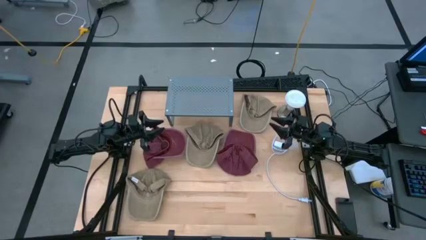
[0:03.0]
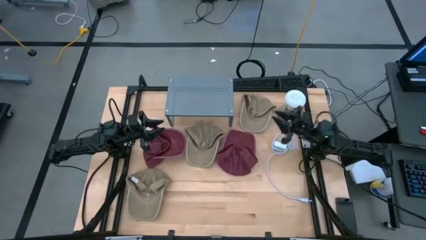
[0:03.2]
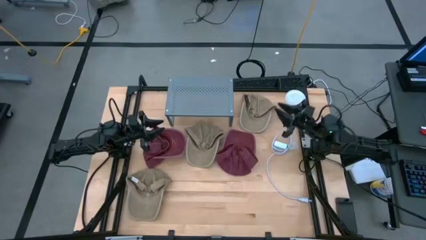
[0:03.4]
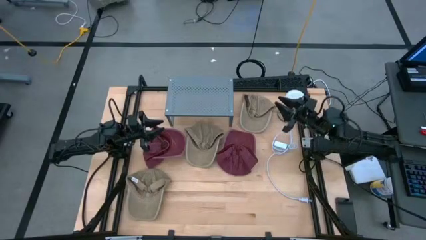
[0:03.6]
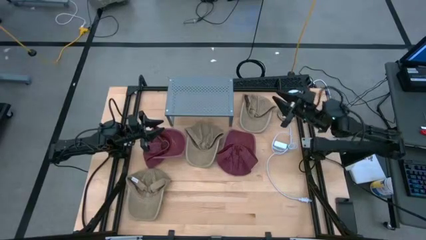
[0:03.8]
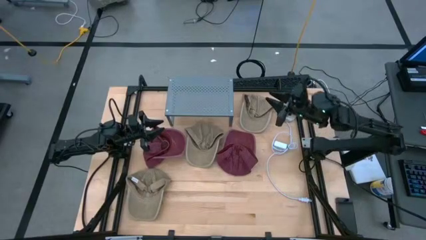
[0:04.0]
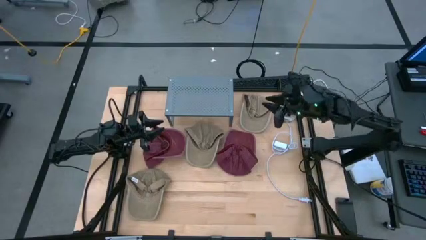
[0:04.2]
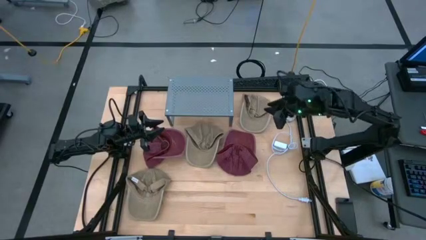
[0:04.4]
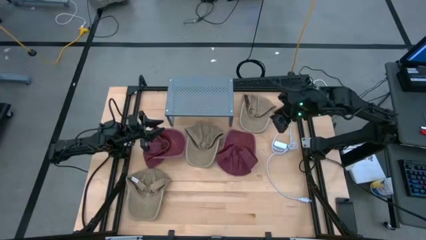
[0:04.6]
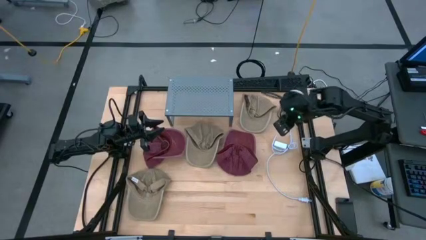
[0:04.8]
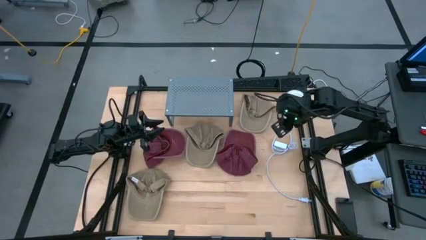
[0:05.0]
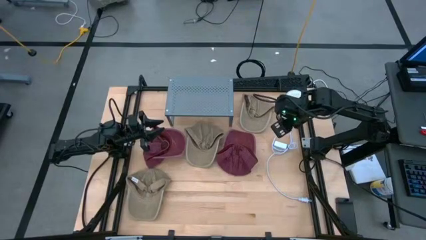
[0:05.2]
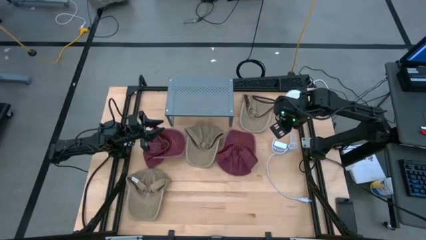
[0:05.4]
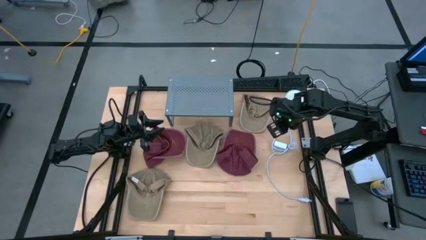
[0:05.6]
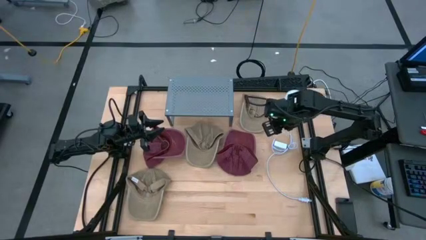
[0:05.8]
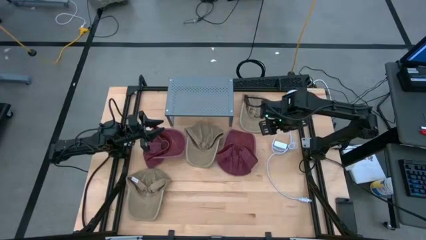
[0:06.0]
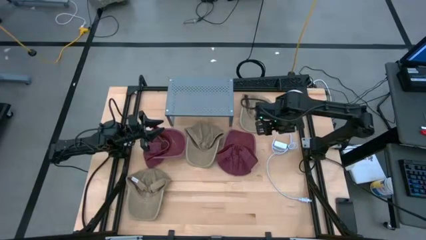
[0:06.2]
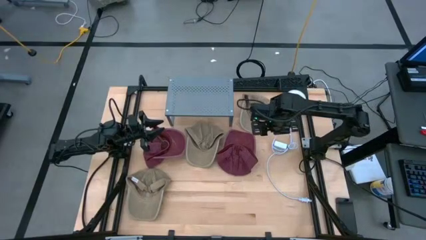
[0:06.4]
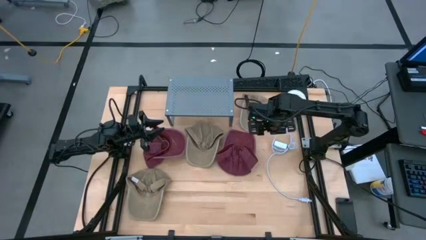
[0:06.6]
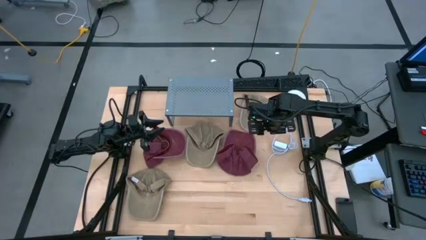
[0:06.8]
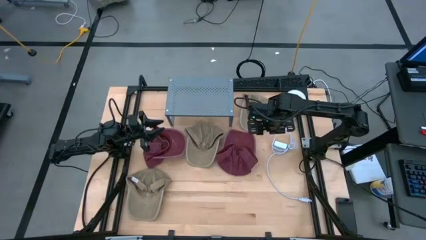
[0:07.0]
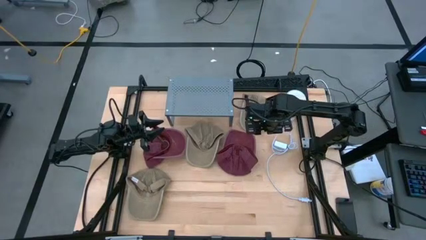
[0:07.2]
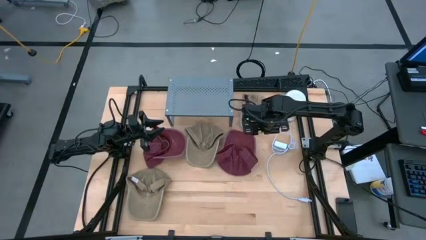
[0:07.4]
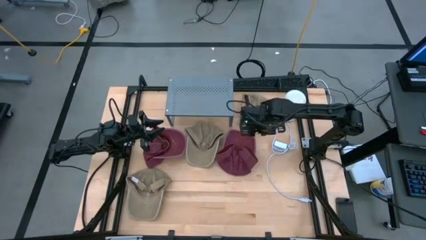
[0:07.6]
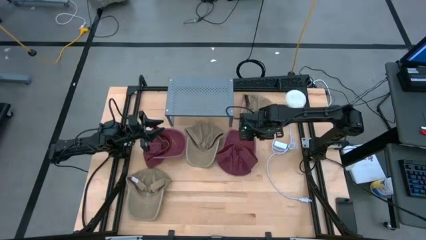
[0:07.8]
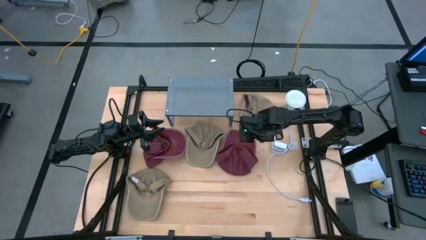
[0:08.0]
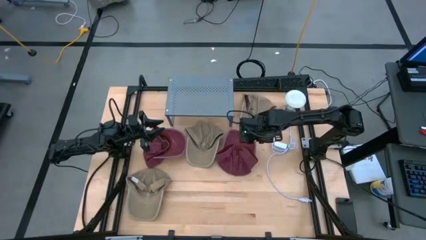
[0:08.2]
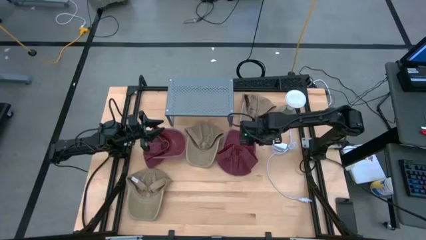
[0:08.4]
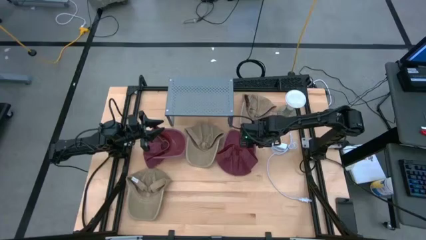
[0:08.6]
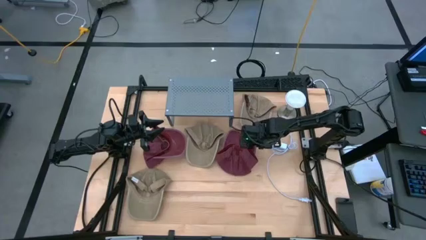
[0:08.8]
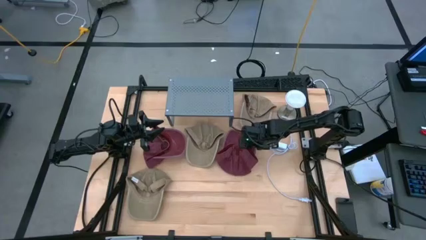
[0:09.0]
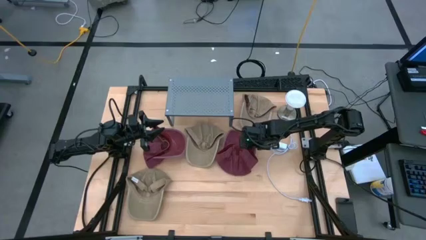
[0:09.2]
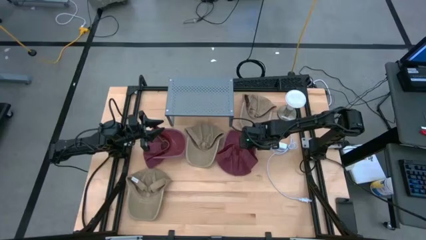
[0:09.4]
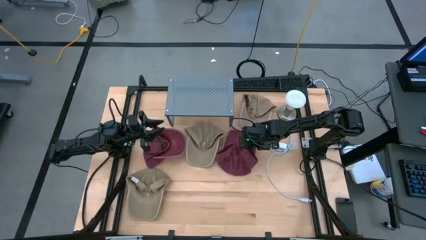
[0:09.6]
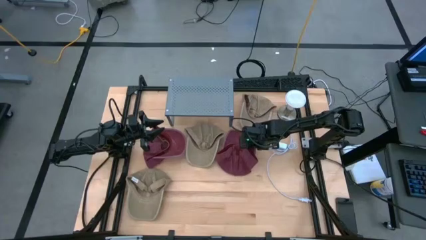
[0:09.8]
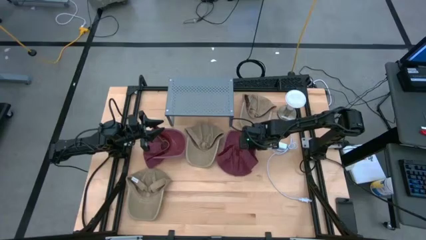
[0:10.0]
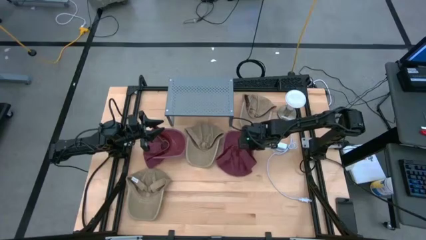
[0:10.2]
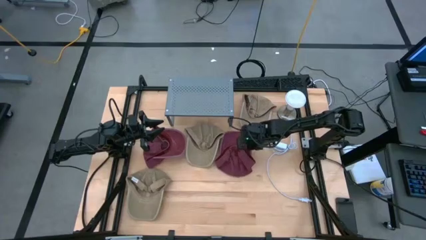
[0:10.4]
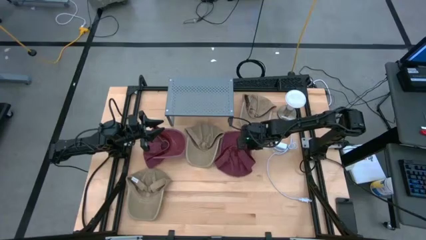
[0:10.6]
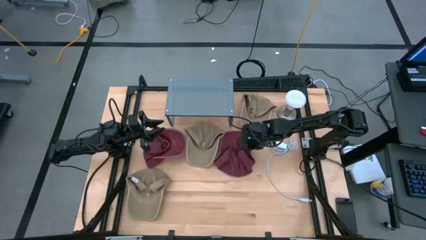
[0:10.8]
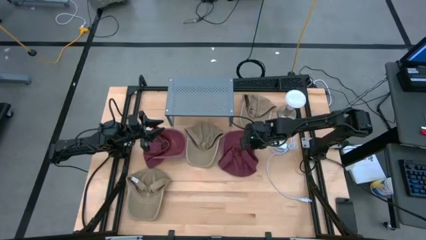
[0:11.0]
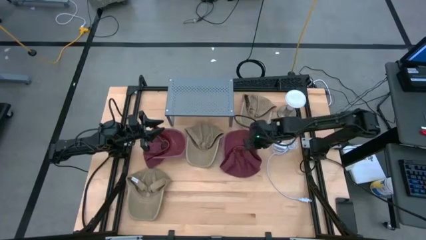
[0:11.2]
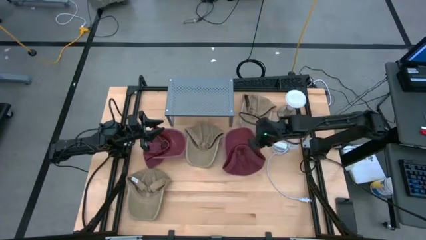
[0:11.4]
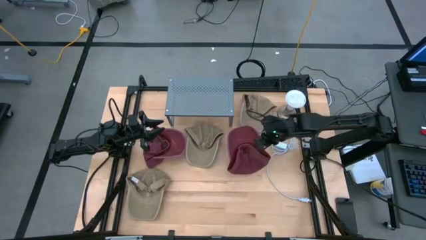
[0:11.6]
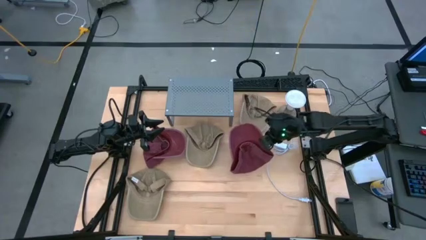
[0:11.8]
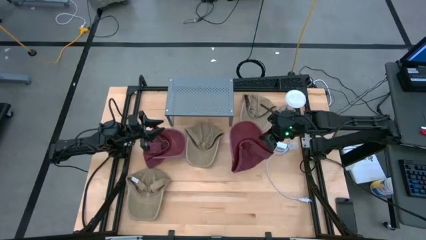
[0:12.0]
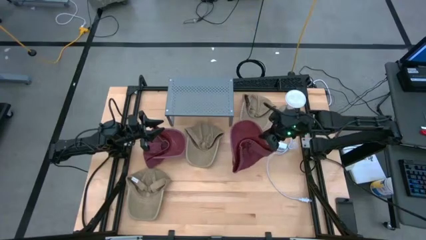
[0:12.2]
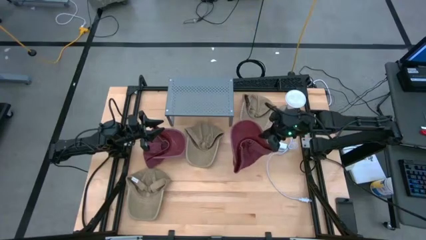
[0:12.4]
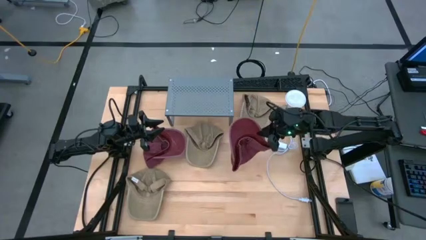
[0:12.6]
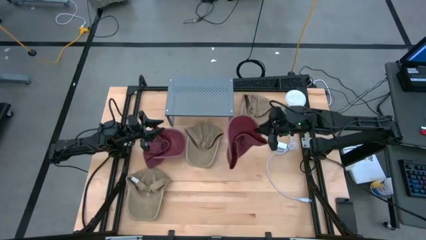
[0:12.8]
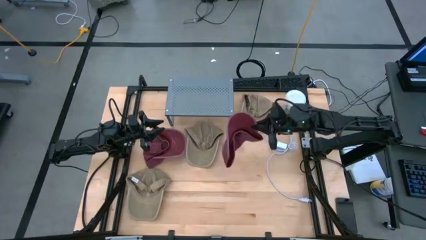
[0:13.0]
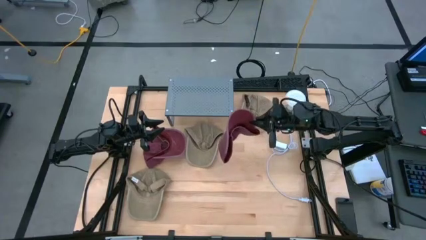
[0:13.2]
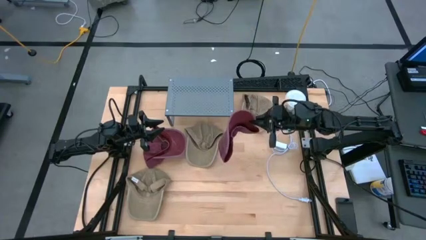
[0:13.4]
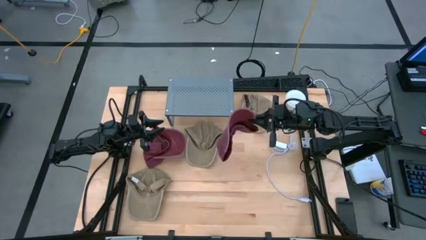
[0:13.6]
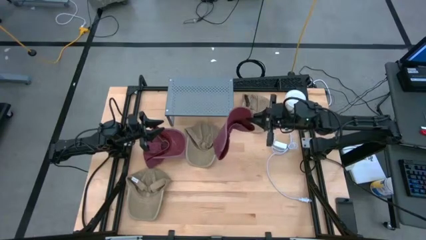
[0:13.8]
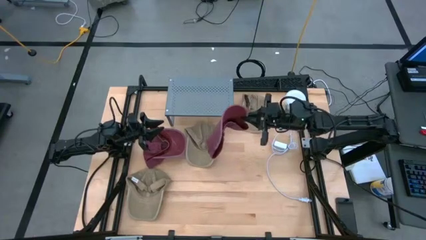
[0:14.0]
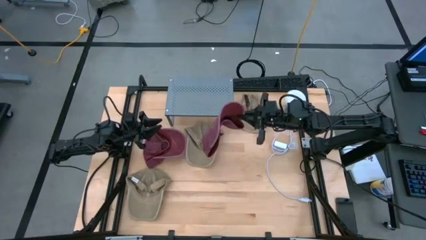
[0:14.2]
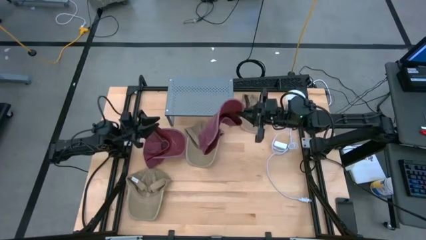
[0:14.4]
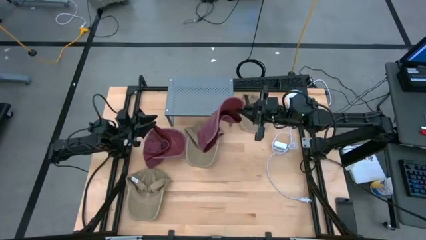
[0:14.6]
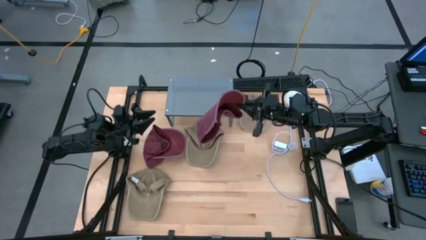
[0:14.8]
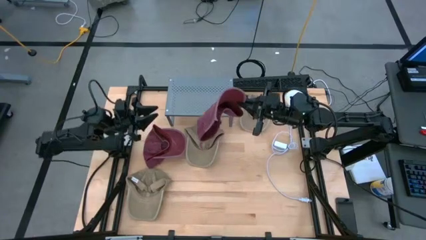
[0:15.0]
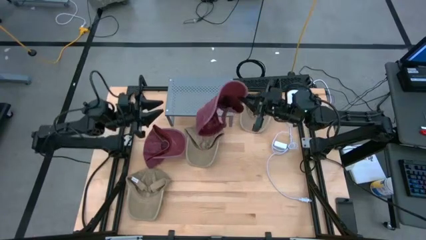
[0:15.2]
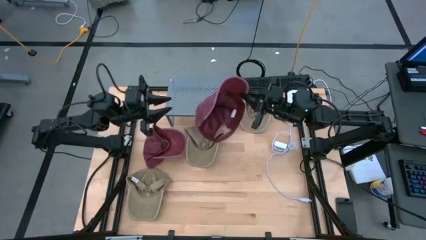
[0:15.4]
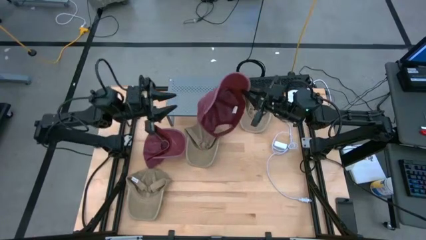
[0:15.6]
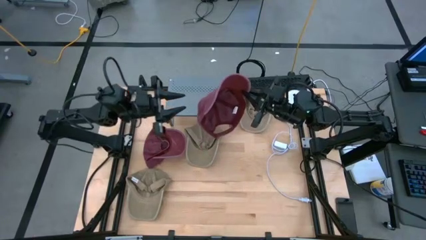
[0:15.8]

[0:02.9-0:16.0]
Task: Pick & Place hat
Put the dark red cap on the shelf
